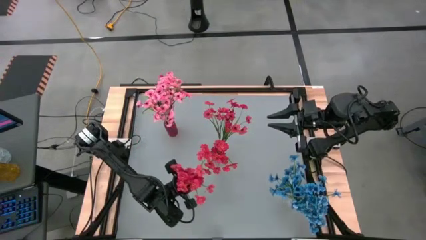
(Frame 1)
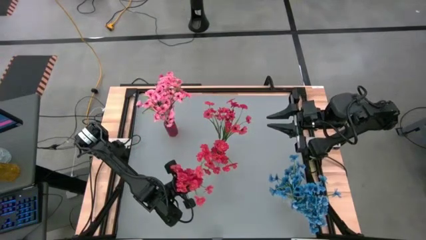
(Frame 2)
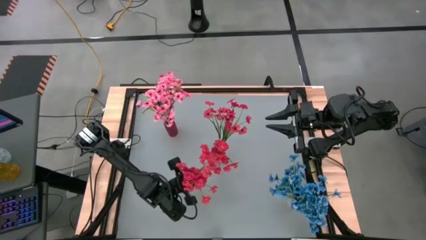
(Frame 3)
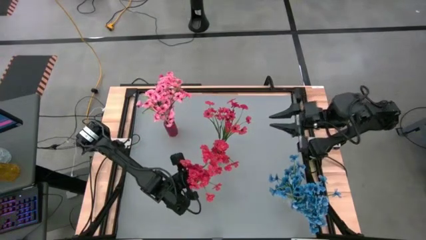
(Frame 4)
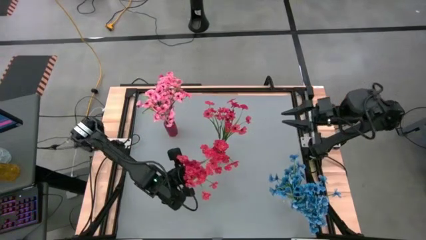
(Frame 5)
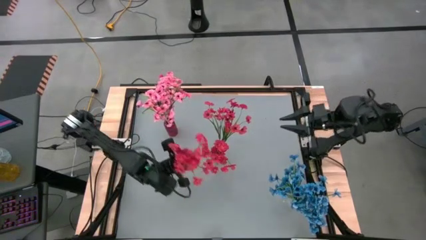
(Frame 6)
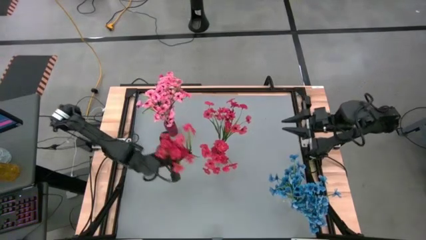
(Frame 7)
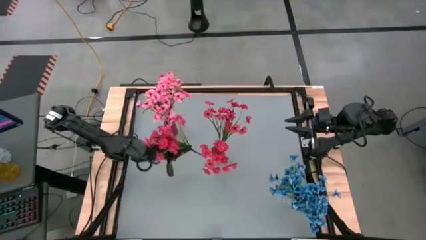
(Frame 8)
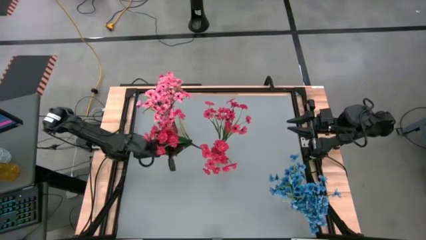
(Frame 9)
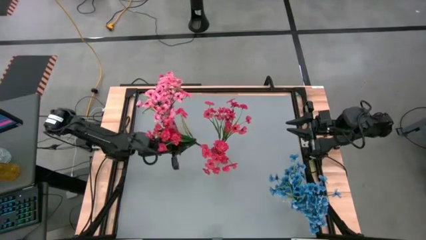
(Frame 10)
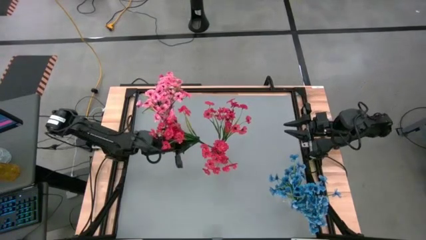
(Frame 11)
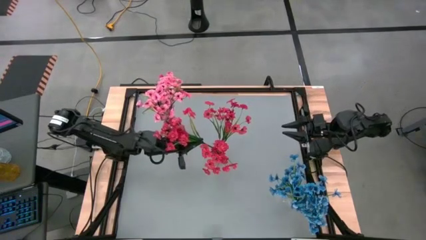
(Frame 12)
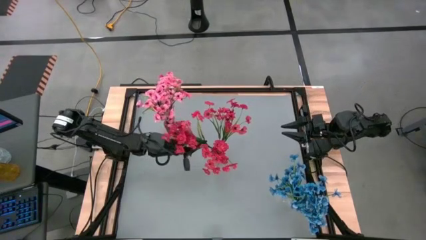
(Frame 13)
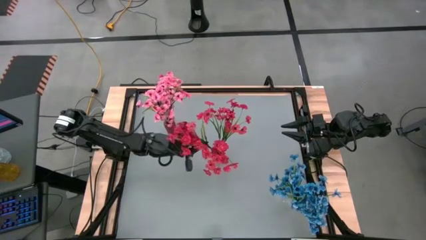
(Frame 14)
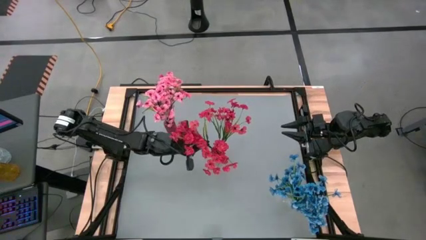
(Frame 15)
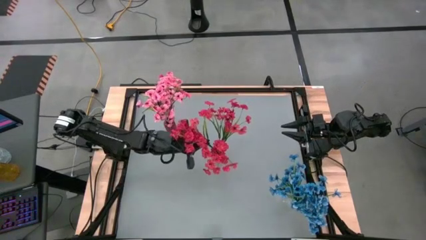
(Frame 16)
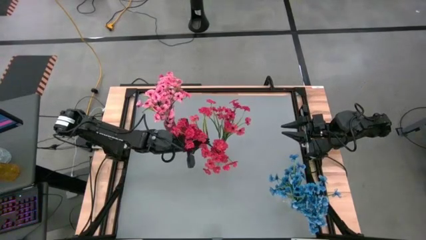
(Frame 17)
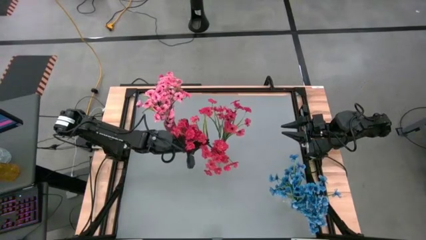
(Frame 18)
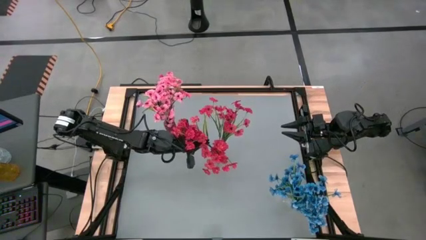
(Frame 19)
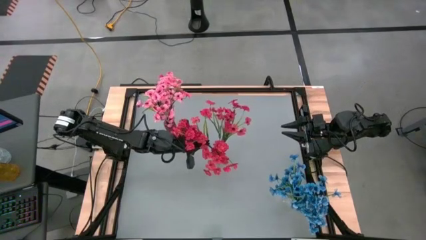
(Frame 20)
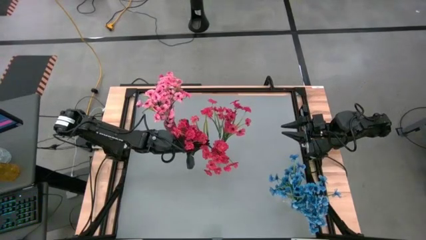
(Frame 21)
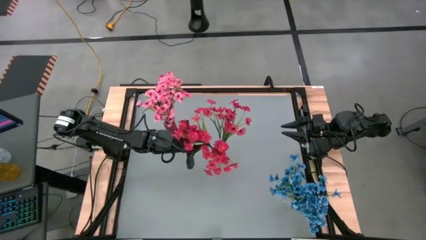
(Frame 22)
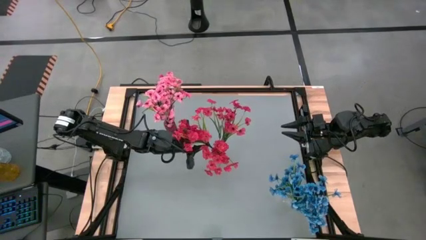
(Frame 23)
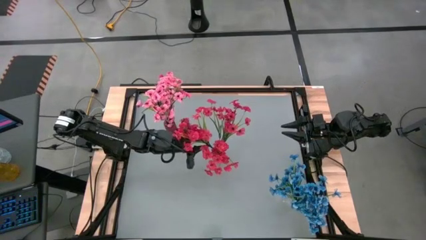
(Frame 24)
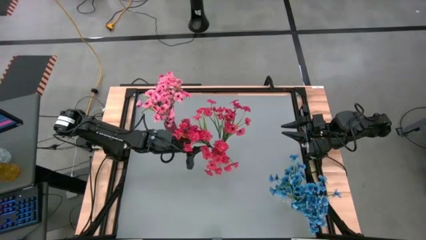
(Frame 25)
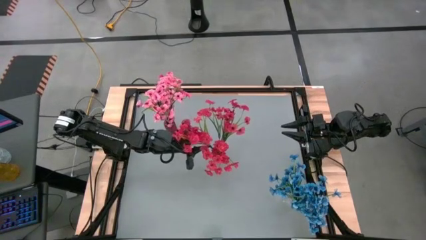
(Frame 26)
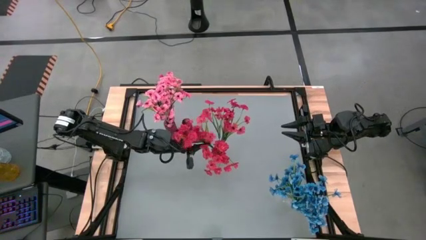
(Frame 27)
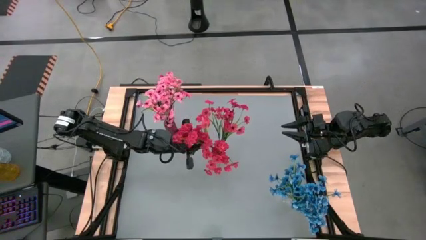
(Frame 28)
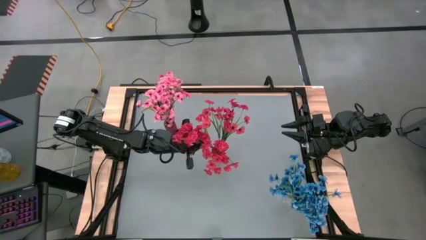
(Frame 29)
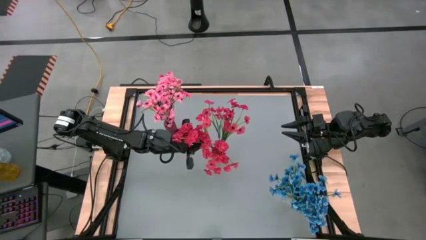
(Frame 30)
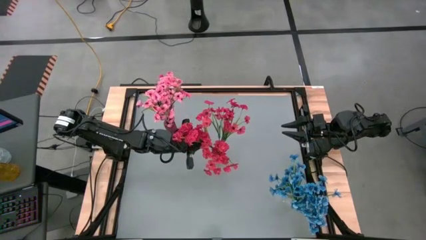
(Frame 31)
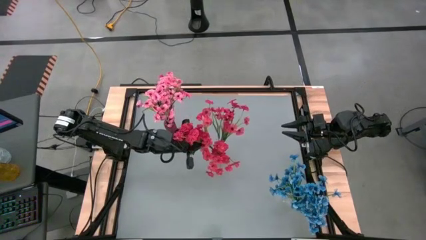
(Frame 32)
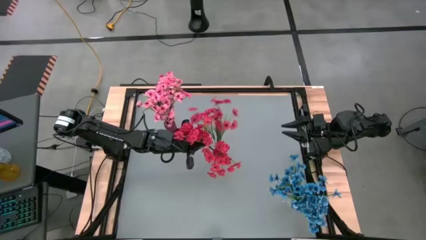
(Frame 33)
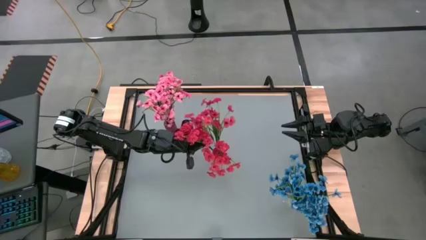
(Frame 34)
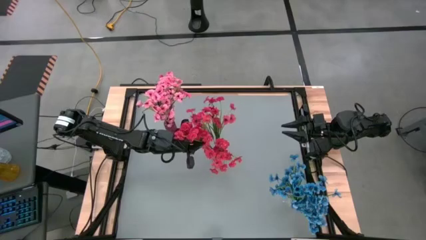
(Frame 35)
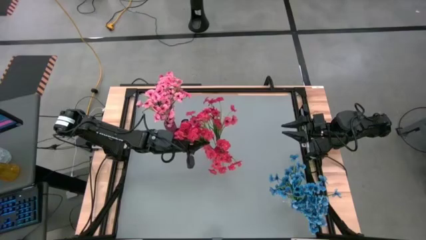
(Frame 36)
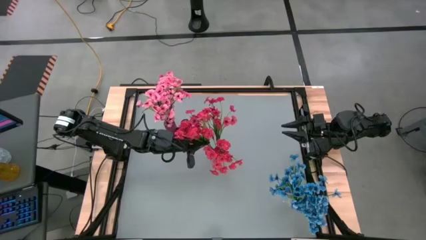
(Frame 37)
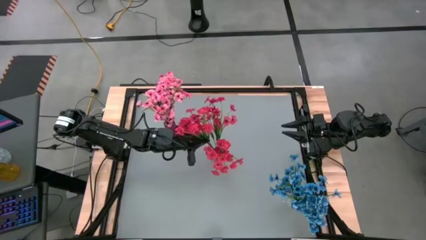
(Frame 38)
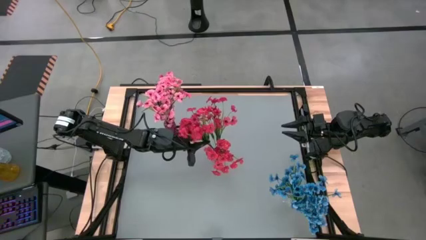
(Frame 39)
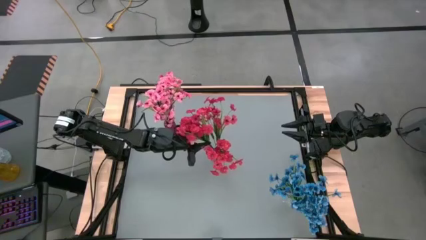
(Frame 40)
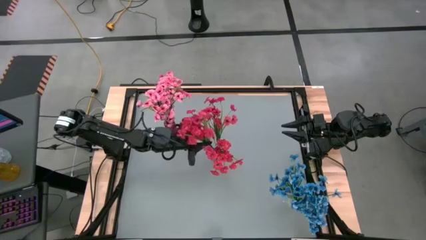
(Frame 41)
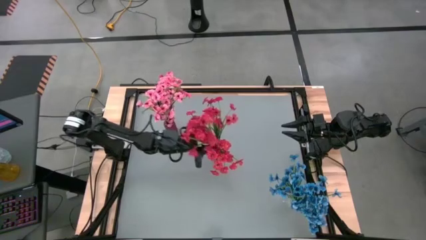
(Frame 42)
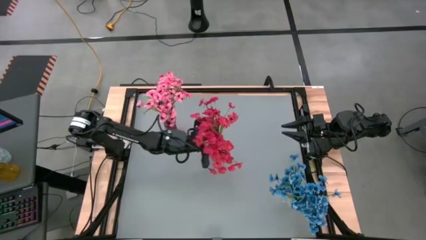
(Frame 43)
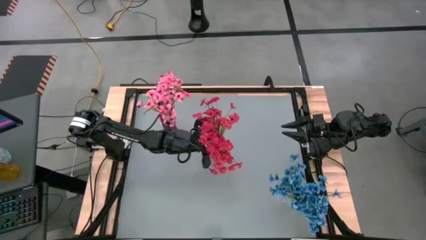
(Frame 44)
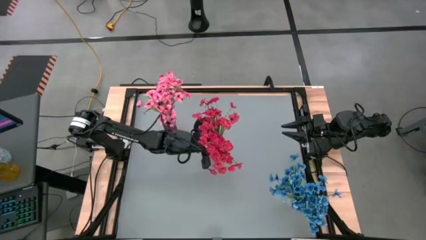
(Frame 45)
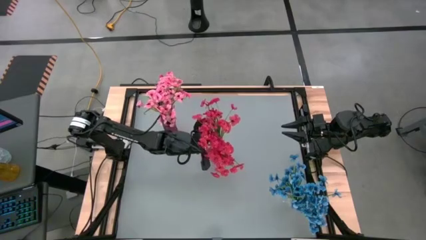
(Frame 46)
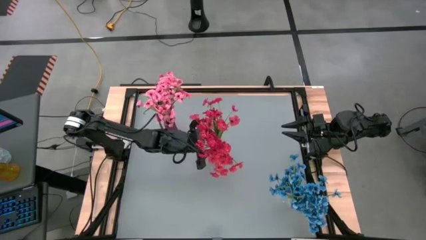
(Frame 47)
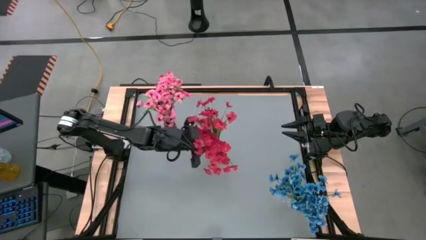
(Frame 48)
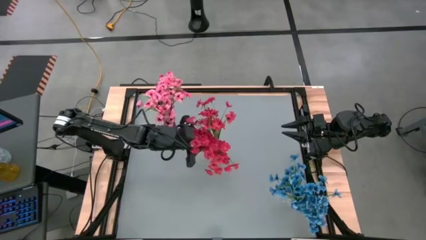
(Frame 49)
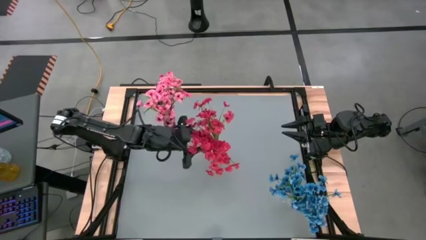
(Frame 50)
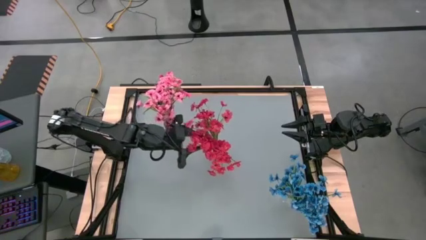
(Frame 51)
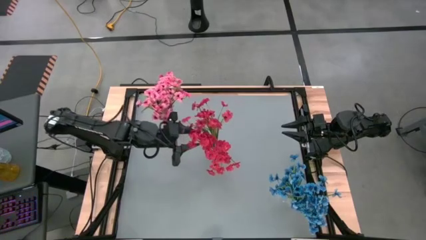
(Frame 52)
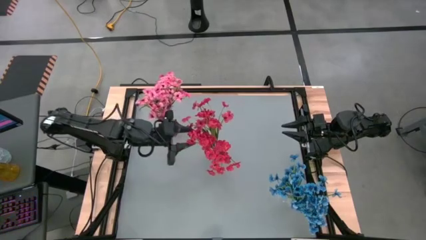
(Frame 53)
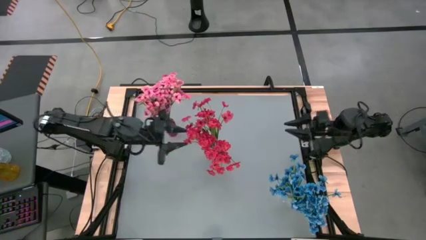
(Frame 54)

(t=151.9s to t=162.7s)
Task: Sort flowers into vase by color
Put the red flowers into the pink vase

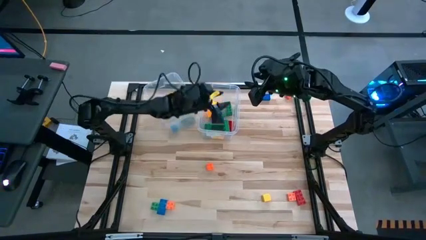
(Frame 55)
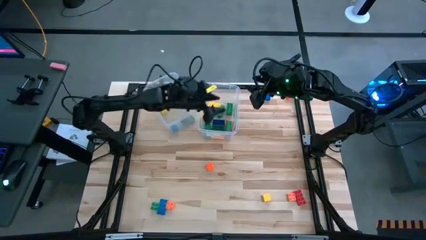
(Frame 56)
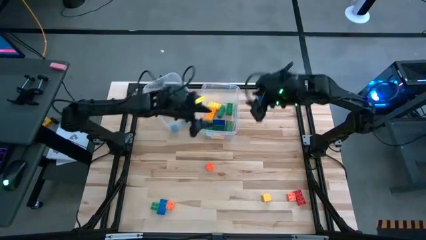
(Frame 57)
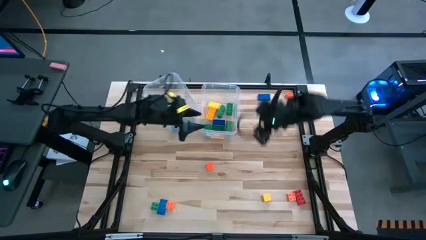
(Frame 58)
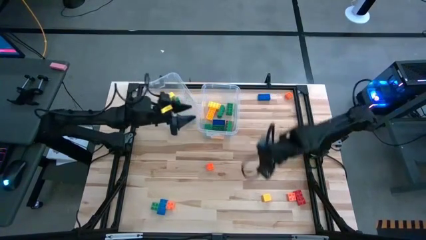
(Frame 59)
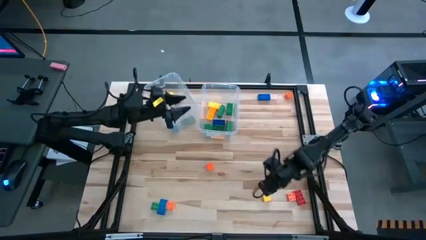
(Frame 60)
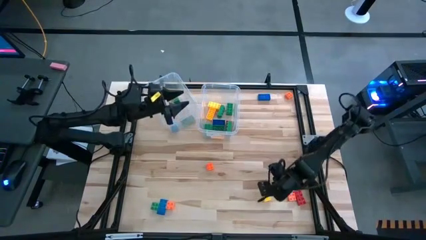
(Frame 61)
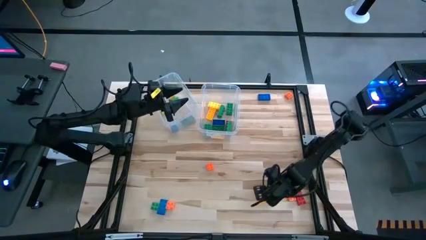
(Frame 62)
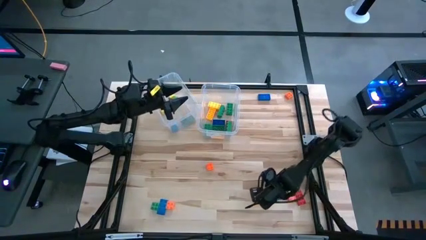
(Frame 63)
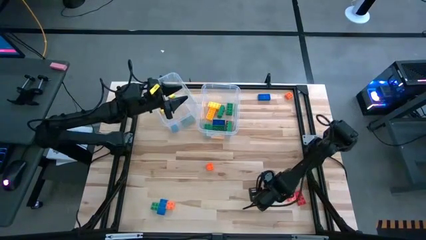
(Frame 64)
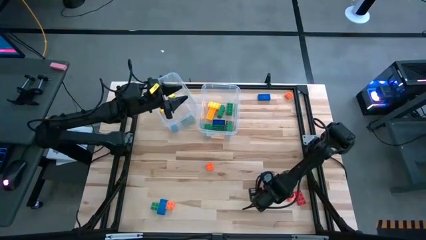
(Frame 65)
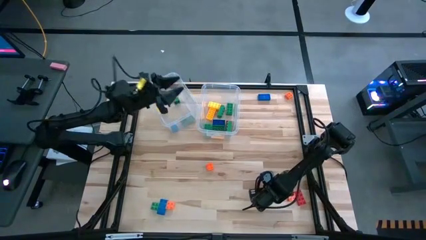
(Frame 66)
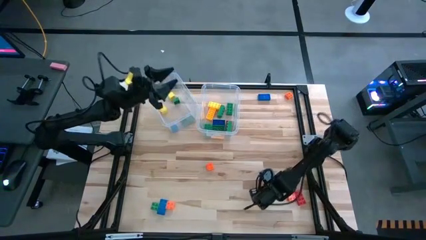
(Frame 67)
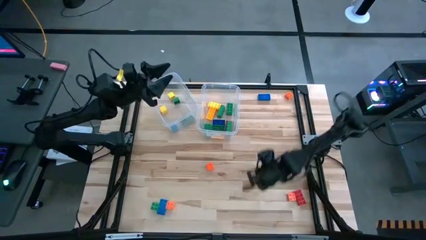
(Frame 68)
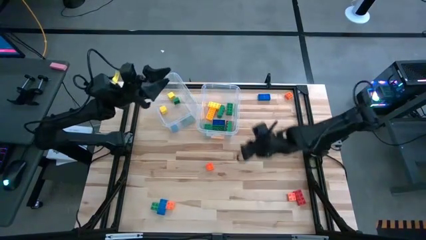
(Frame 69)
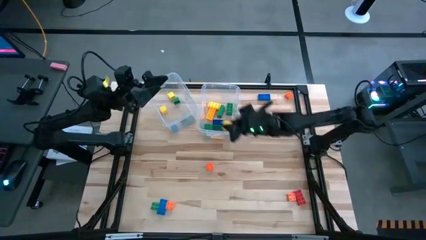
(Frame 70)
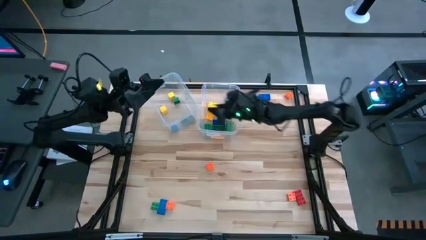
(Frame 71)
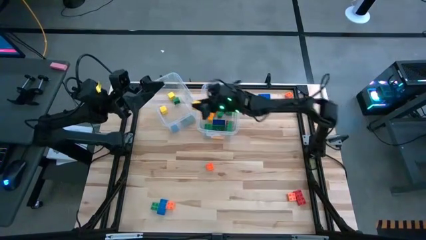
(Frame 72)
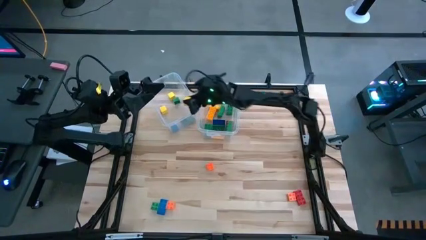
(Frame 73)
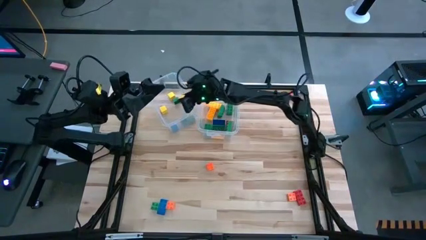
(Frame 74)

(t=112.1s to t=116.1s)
Task: Sort blocks by size
Put the yellow blocks into the left transparent bin
